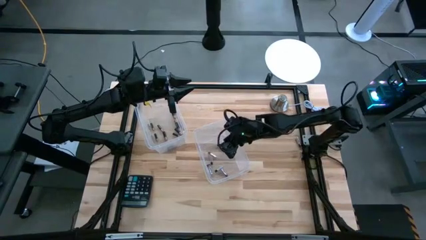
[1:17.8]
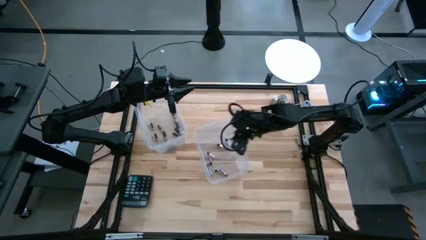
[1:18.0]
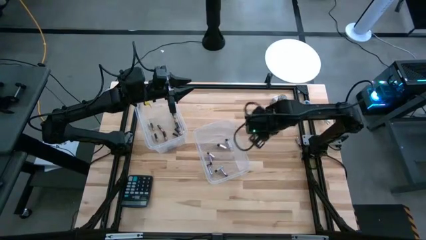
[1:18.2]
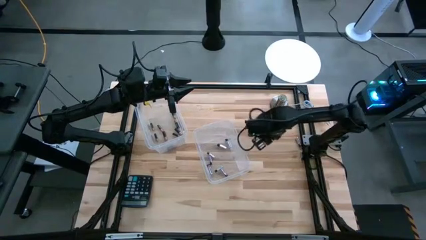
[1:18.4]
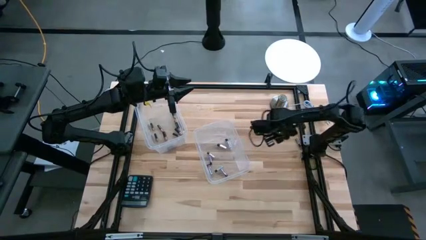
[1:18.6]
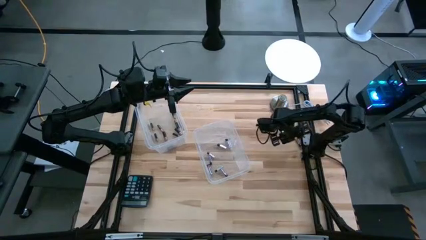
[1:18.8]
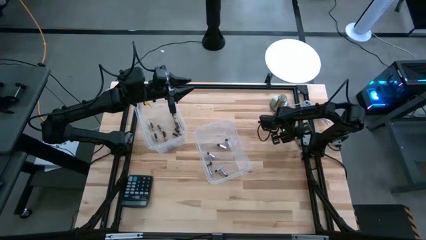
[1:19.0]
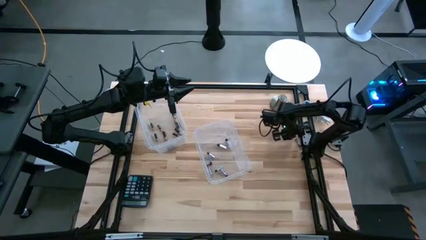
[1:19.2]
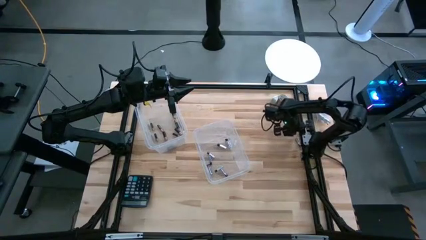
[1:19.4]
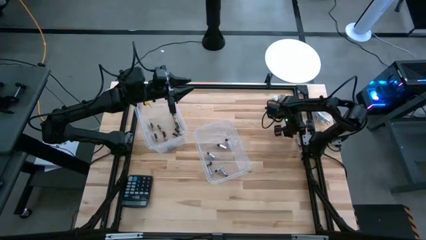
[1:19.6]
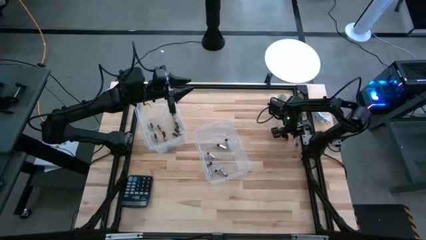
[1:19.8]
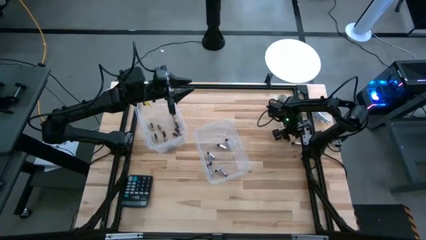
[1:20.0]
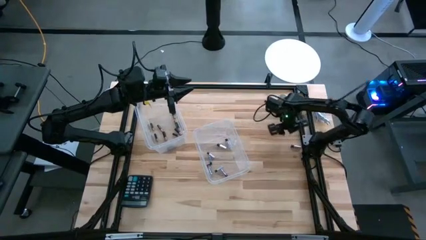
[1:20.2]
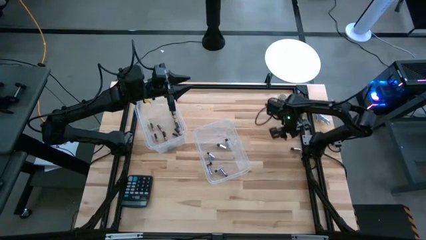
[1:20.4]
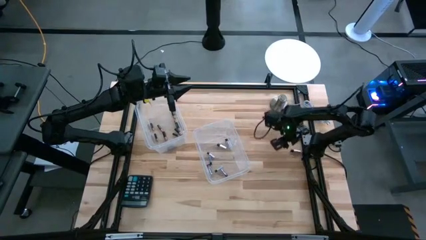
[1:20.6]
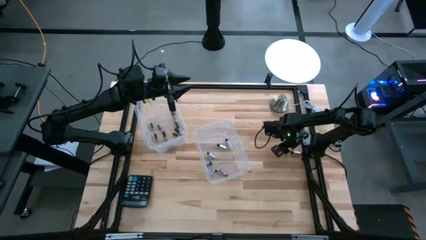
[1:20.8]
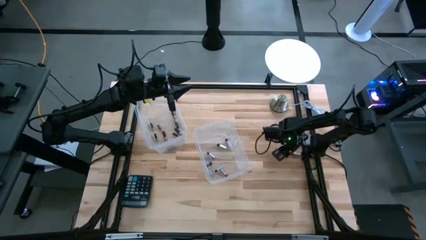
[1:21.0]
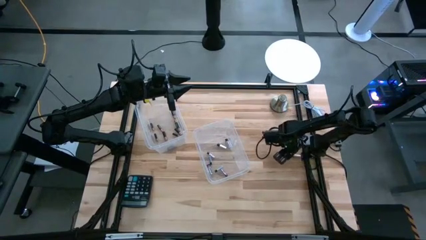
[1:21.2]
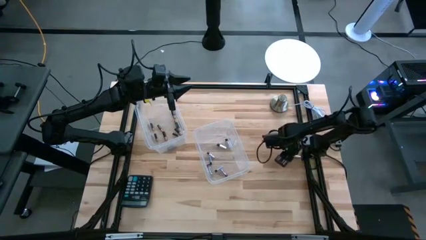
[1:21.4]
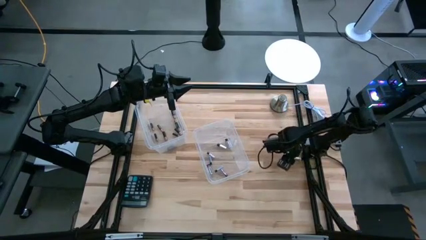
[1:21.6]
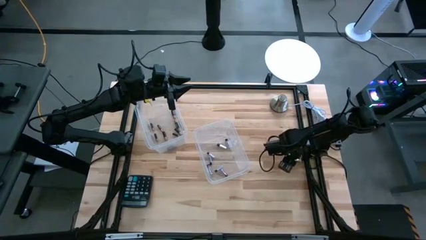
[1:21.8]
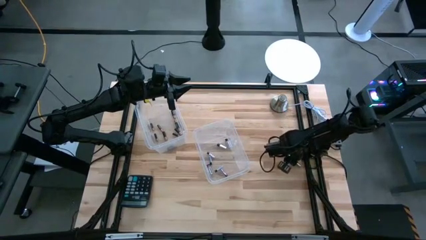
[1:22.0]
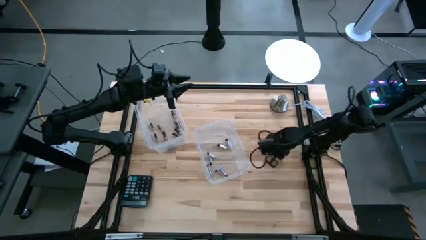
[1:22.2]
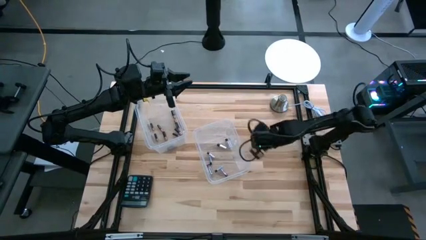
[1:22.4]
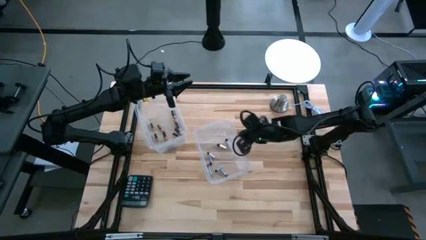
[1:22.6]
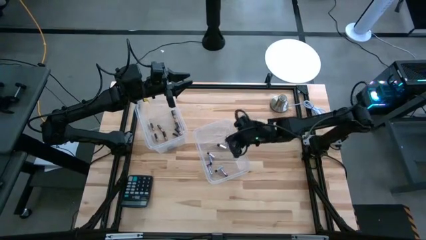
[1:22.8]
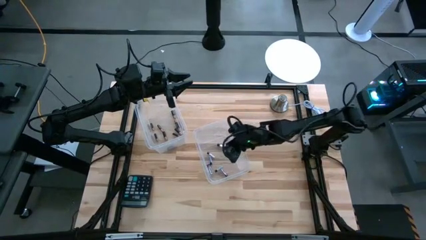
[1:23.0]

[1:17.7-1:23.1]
Task: Sort batteries
Put the silver battery into the right transparent bin

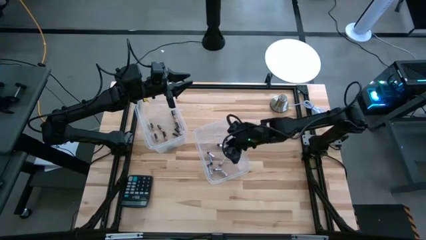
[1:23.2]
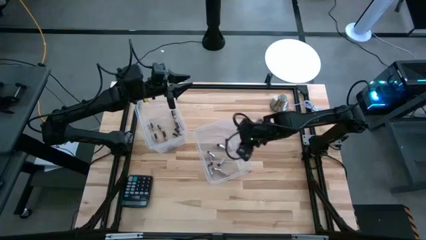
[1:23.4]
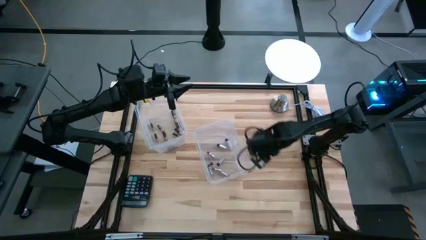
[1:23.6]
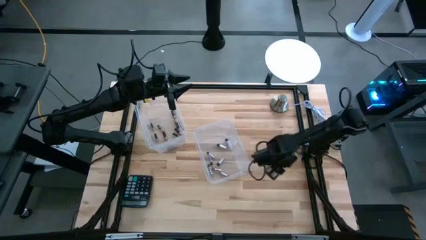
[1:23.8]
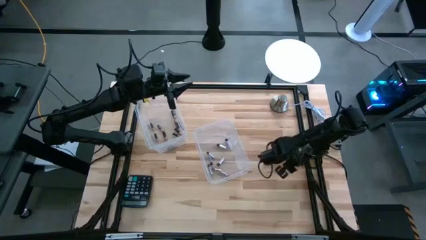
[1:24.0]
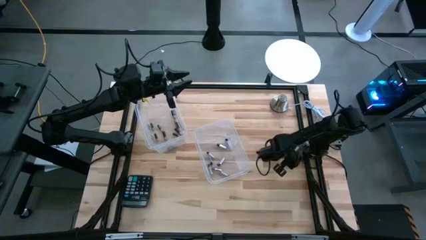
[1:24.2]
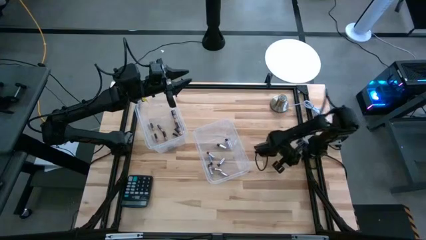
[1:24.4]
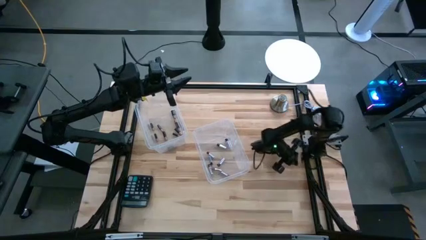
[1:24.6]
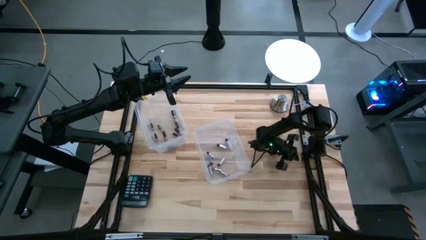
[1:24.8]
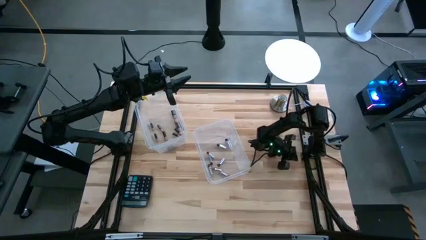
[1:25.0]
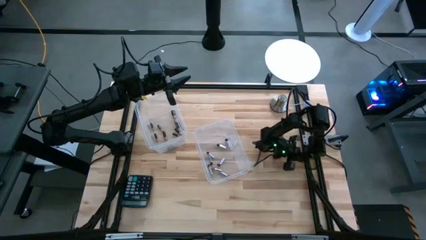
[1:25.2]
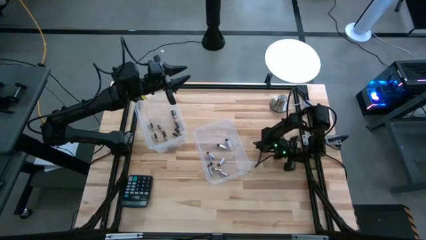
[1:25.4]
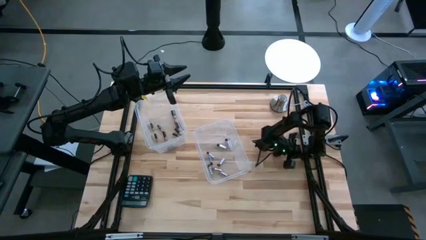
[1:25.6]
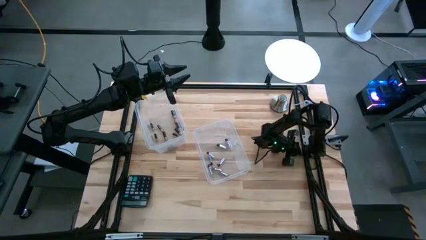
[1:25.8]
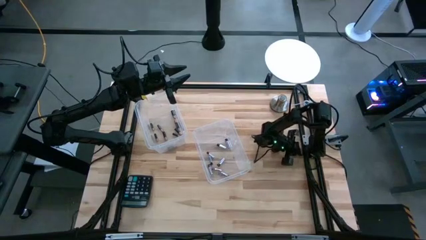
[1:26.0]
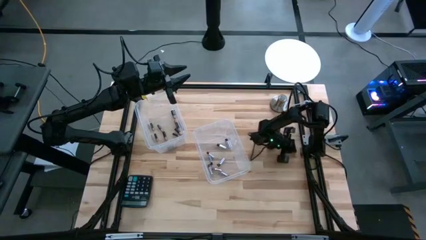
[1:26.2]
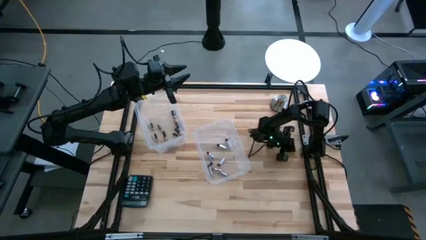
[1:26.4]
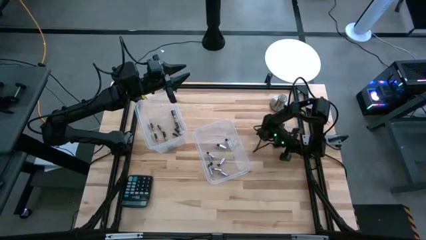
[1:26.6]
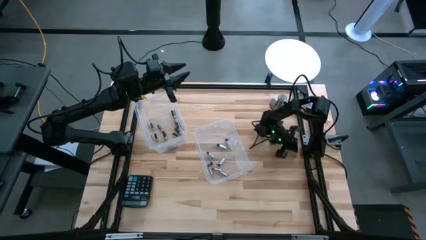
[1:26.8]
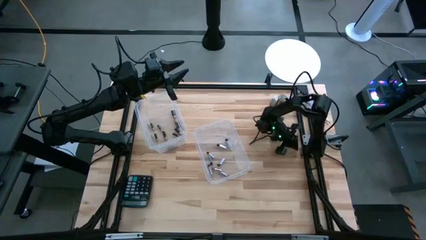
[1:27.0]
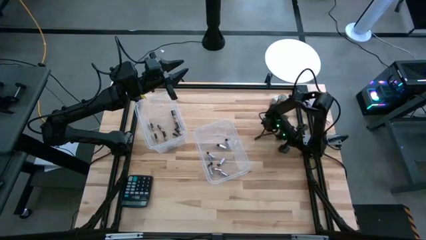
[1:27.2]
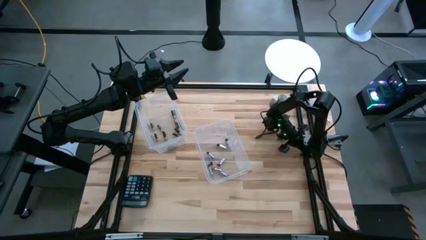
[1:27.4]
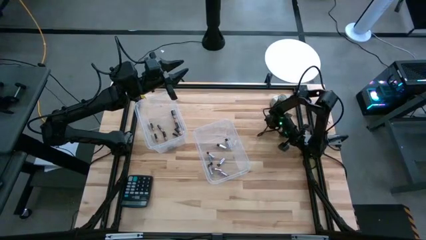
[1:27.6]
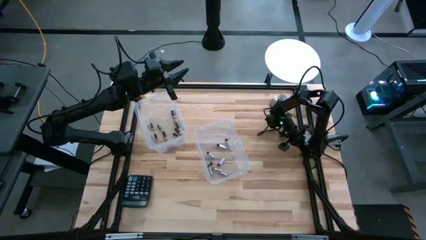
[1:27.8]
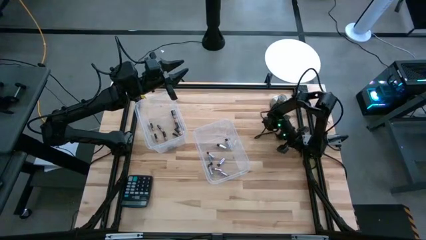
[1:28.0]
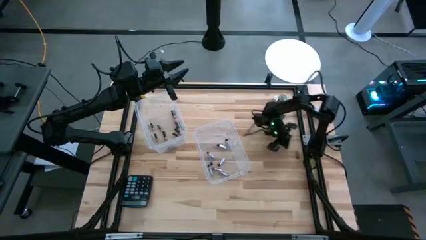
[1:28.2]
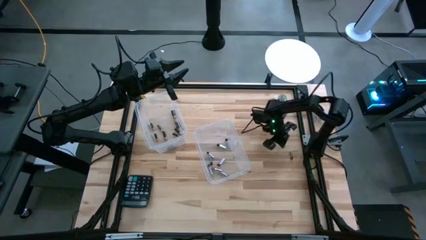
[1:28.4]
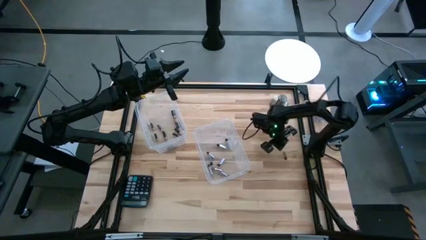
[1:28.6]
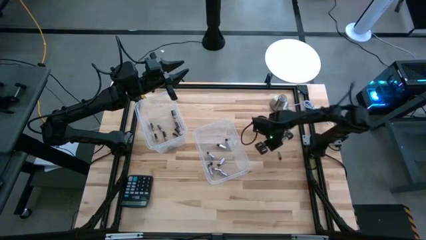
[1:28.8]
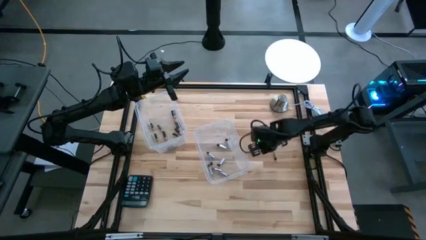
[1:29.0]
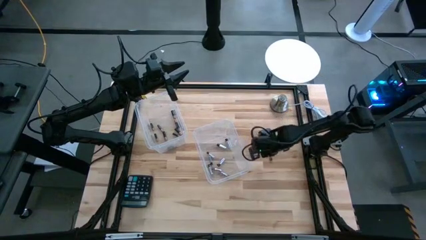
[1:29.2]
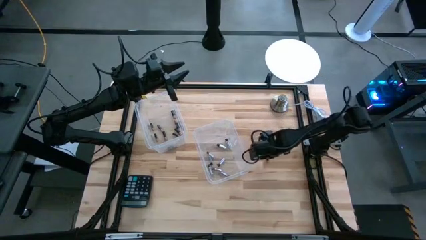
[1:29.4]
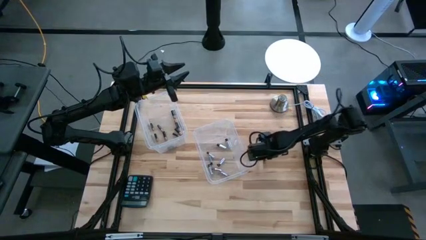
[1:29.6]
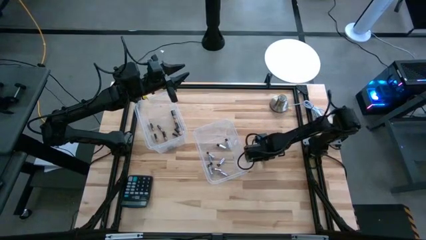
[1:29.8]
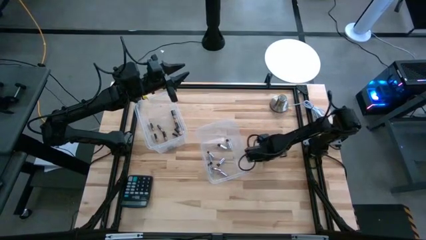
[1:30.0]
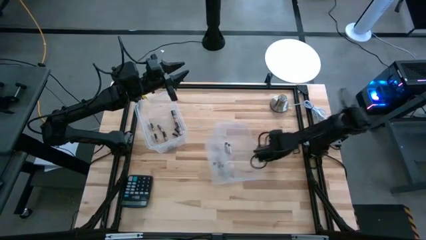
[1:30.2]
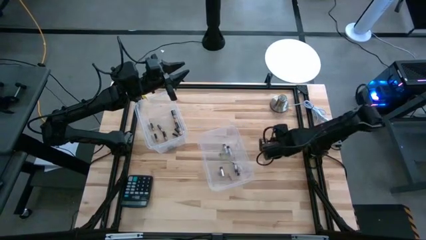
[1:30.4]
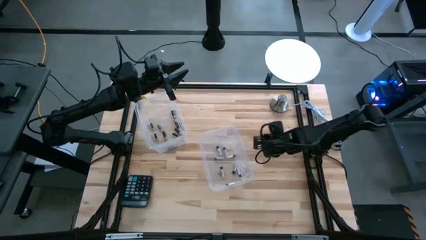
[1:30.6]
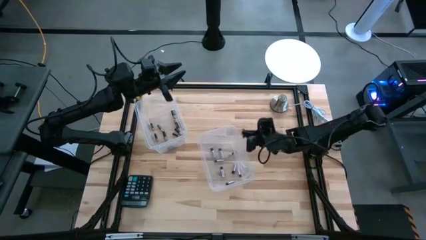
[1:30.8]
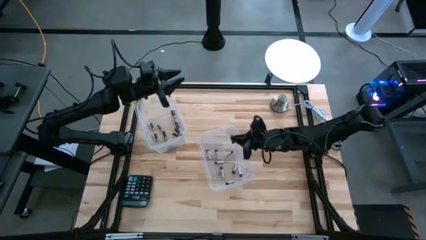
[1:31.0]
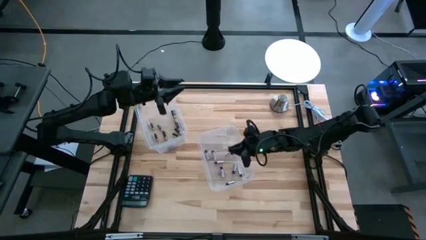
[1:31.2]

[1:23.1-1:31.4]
Put the silver battery into the right transparent bin
